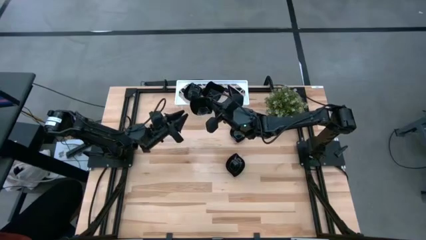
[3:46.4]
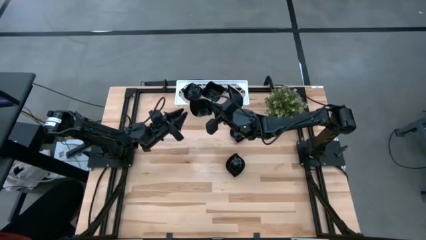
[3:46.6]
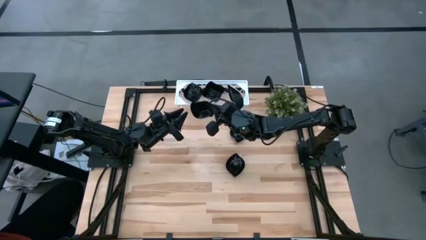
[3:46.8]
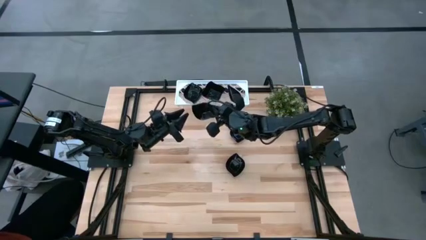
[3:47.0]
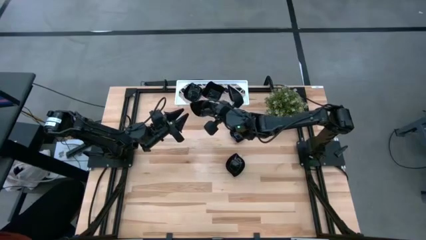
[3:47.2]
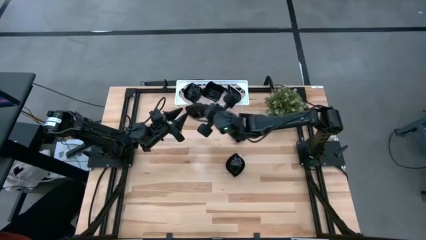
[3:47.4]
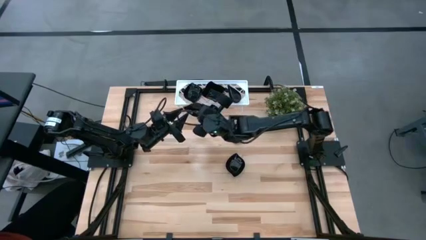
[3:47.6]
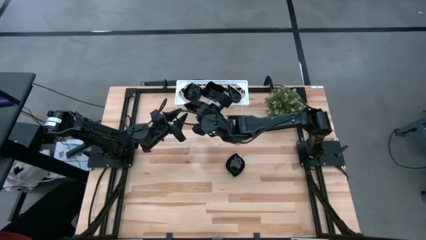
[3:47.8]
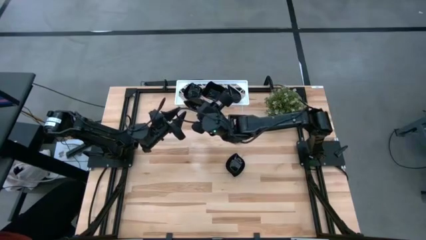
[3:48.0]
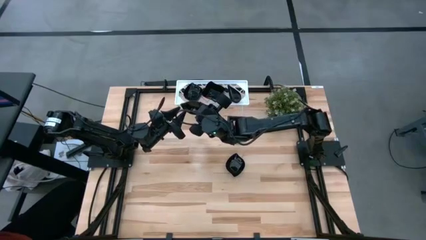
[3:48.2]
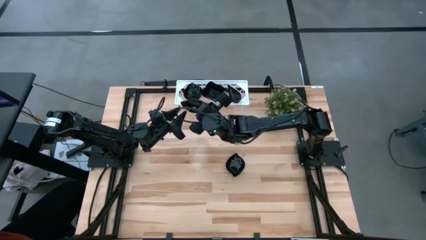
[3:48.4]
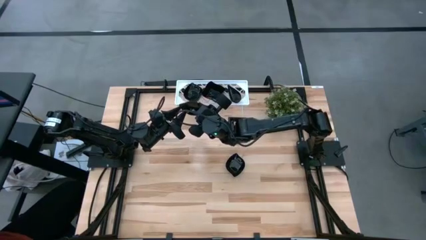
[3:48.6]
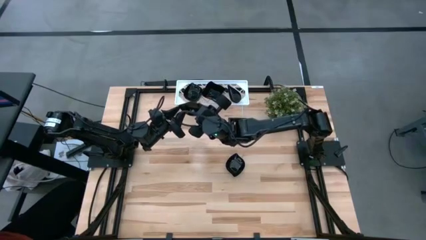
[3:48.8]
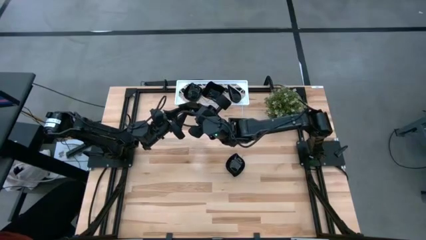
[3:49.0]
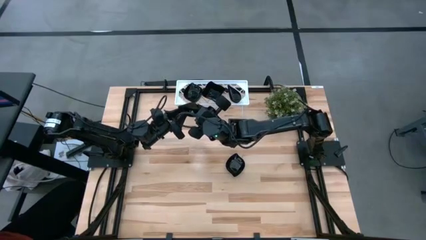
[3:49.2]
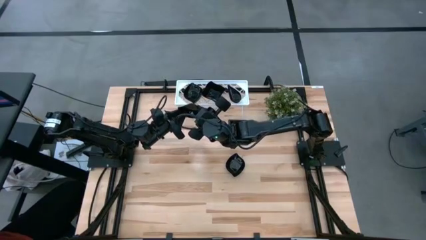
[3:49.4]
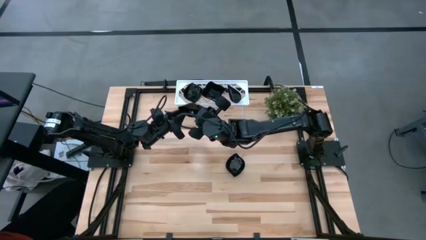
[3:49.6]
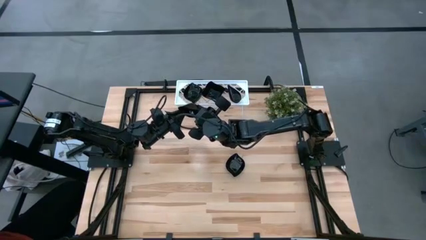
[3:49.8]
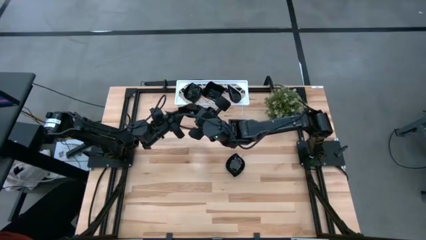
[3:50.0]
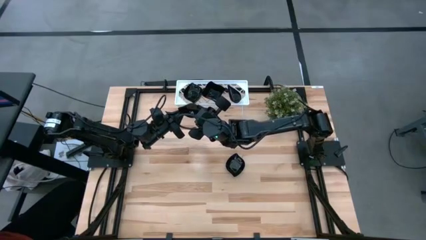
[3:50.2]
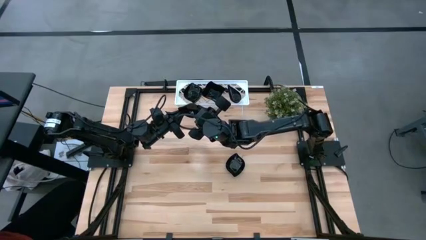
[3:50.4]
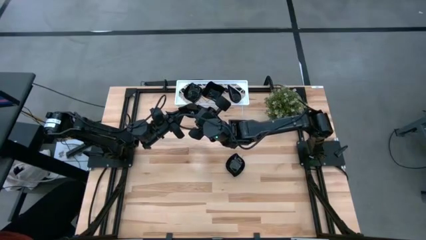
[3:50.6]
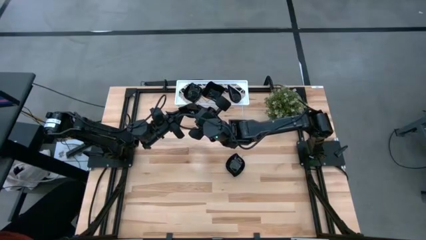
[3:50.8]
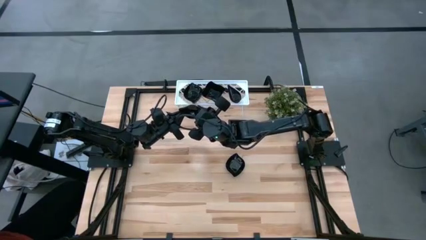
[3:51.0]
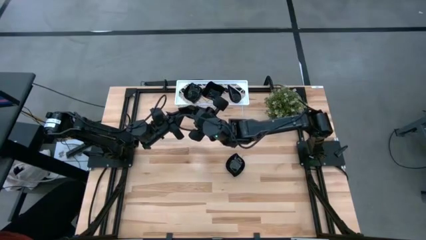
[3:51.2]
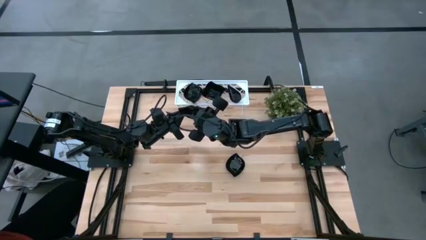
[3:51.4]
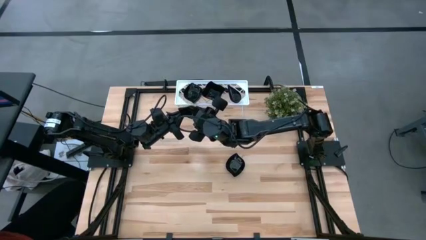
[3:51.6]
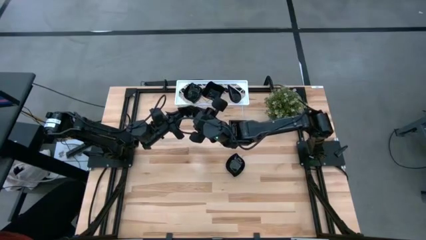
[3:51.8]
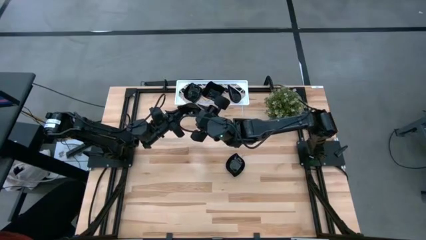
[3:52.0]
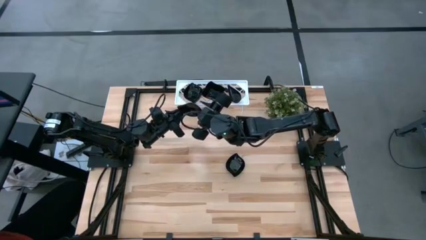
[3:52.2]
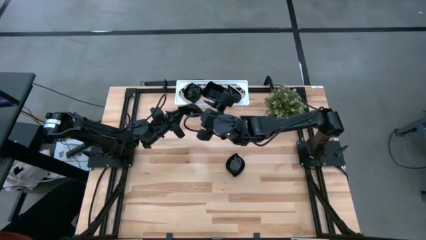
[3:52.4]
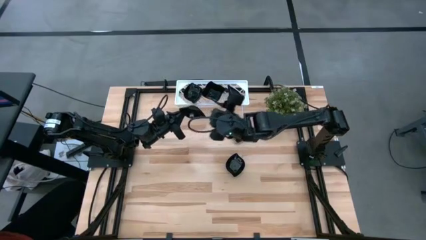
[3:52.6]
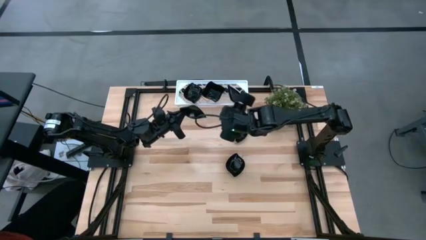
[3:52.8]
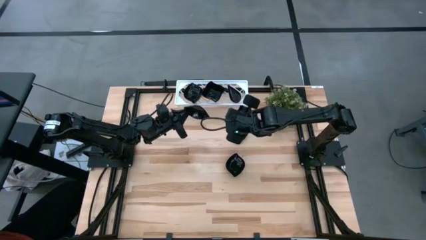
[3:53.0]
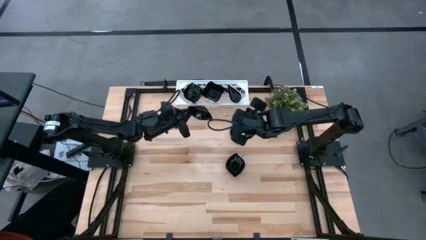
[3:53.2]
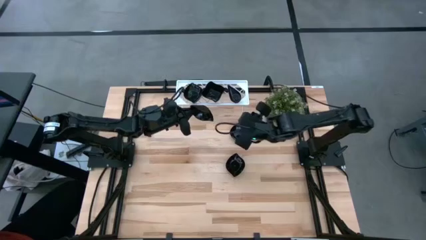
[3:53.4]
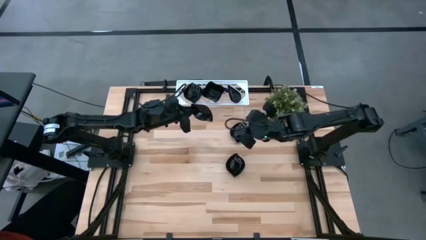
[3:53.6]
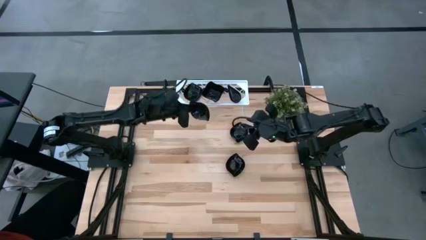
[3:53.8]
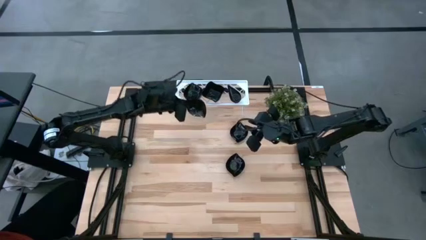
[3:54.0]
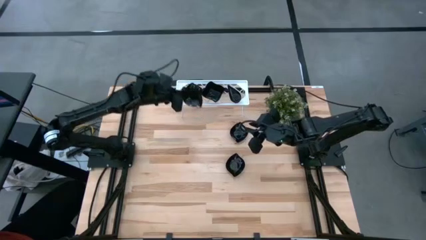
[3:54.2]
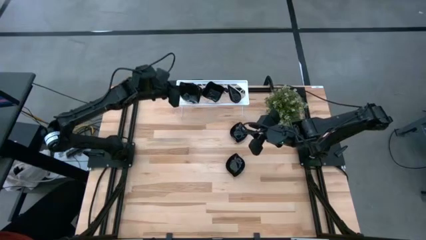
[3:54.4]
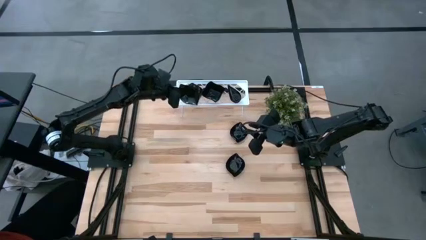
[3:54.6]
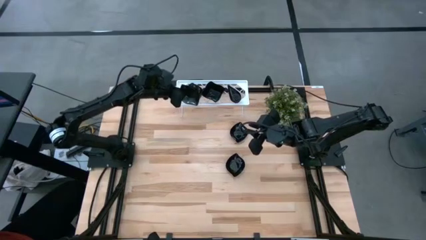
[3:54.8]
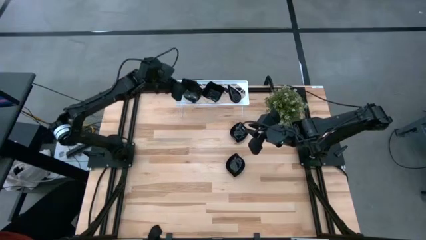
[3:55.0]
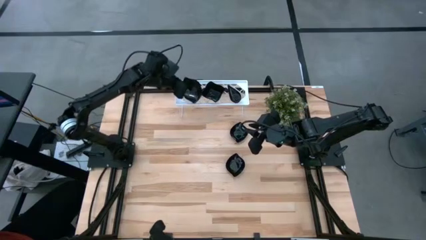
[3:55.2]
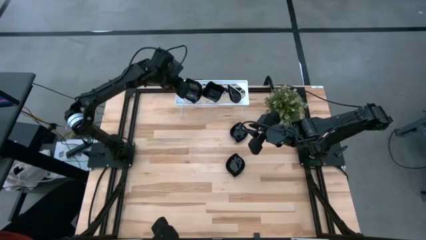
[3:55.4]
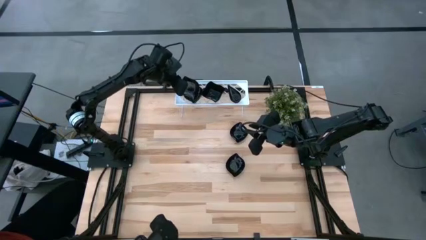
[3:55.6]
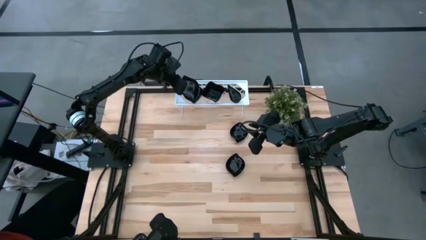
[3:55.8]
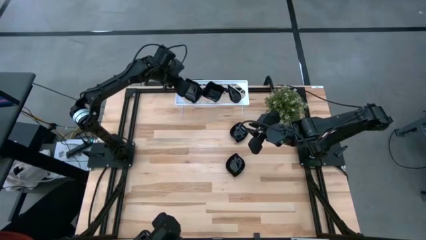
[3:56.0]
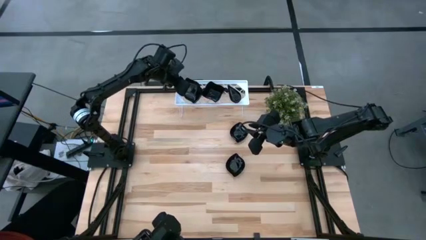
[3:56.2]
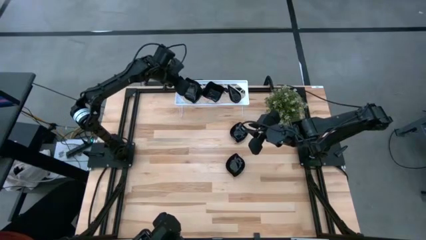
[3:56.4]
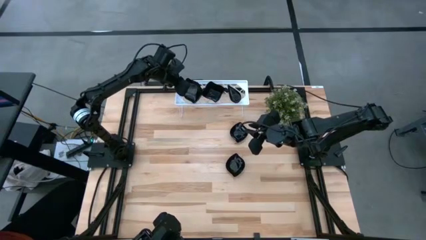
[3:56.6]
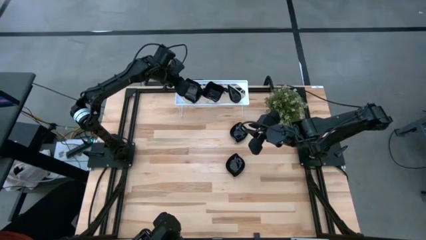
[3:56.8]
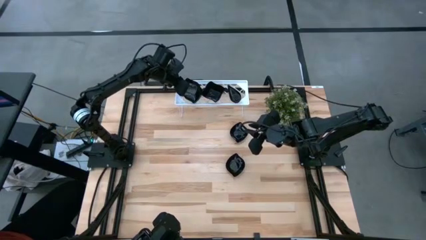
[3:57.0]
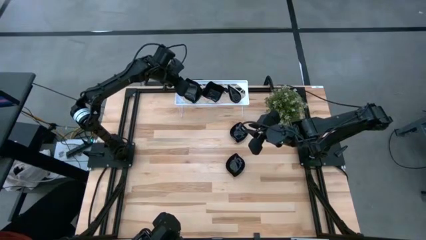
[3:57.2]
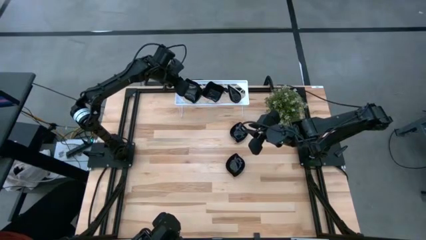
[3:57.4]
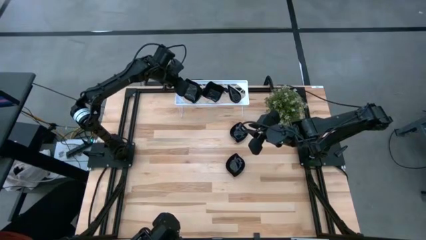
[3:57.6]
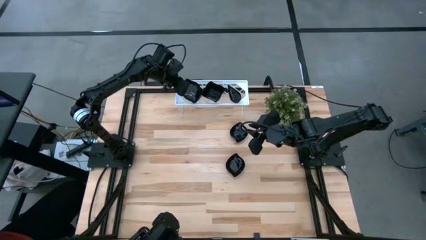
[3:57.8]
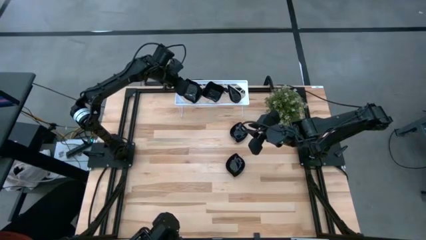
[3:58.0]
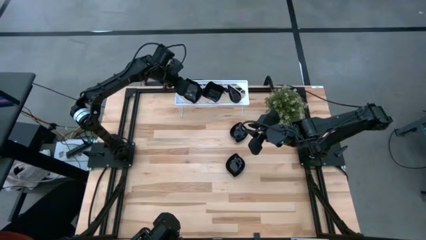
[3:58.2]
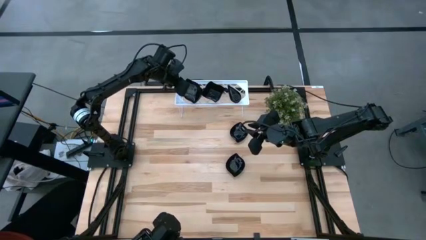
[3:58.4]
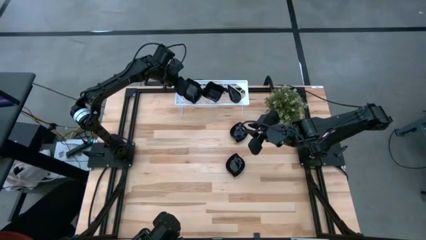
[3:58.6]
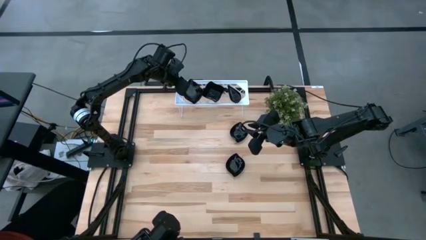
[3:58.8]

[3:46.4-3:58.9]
Task: Pick & Place Mini shaped plates
Stack the leaf-shaped plate on top of the other leaf-shaped plates on the shelf

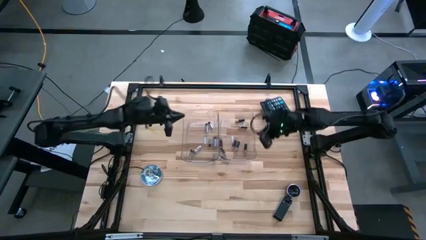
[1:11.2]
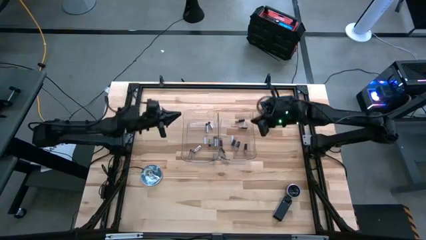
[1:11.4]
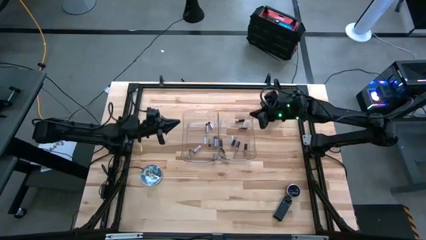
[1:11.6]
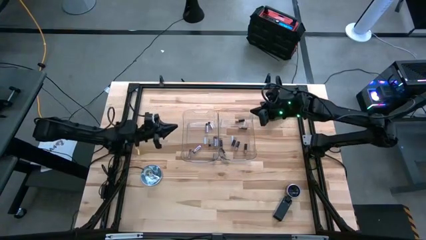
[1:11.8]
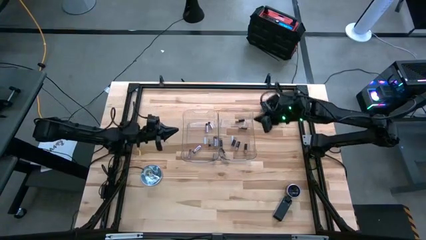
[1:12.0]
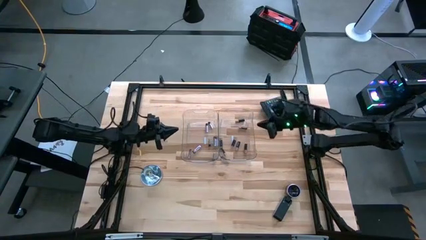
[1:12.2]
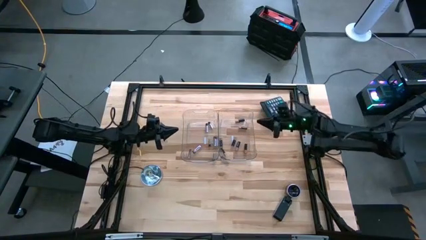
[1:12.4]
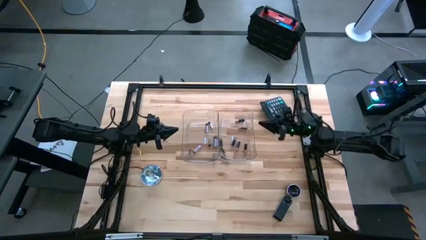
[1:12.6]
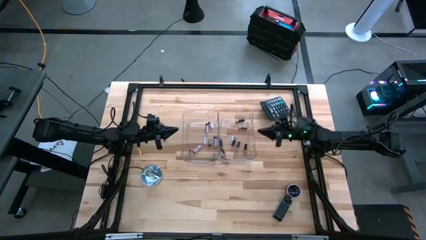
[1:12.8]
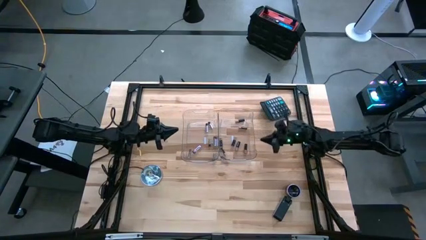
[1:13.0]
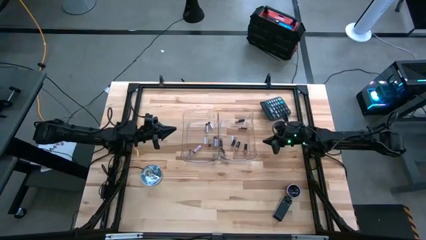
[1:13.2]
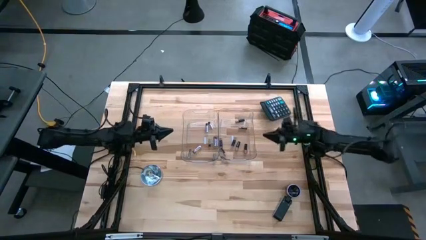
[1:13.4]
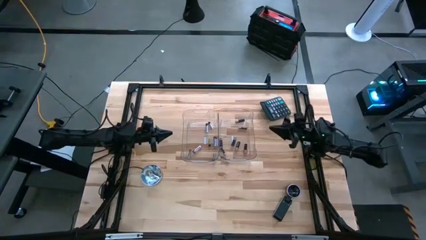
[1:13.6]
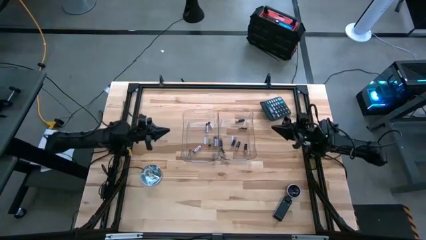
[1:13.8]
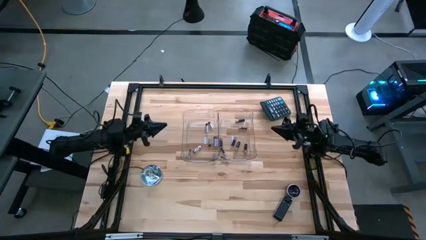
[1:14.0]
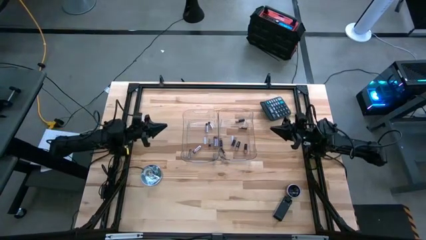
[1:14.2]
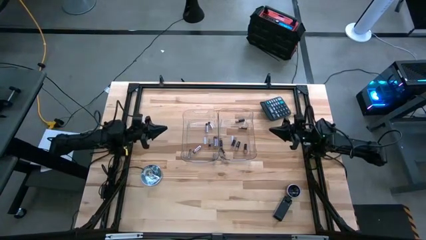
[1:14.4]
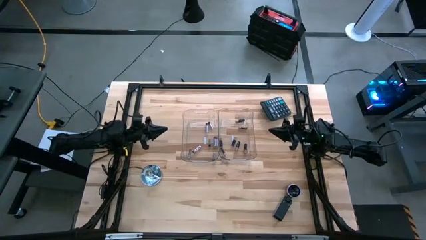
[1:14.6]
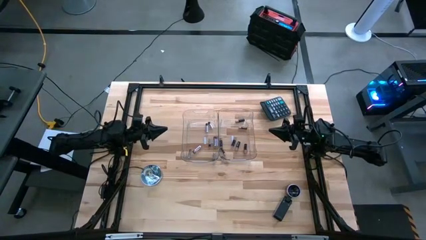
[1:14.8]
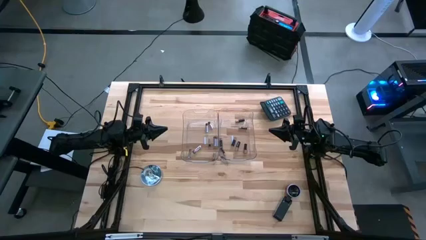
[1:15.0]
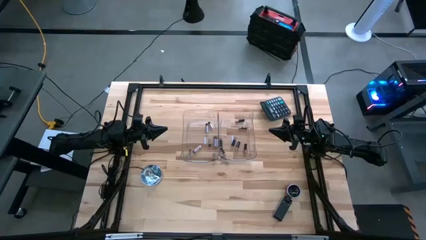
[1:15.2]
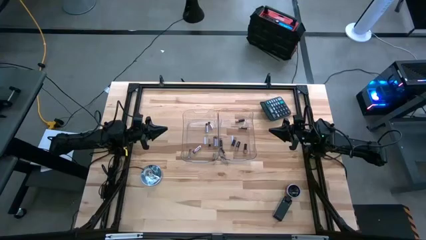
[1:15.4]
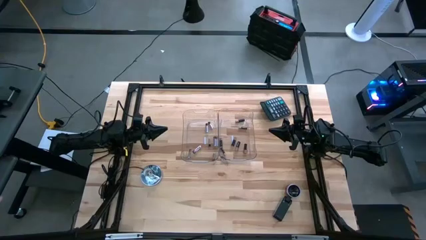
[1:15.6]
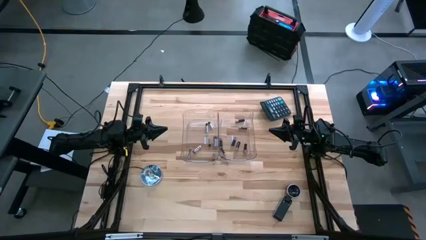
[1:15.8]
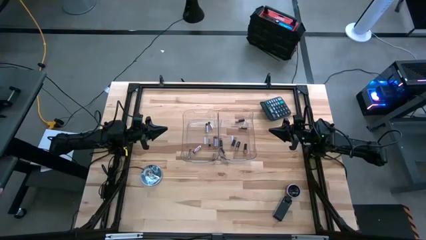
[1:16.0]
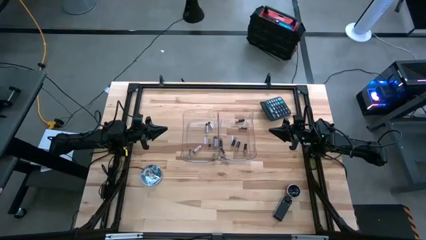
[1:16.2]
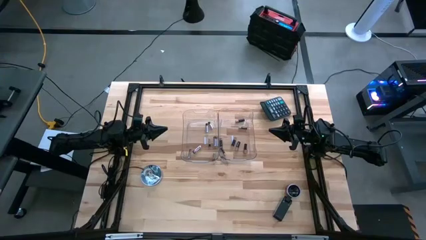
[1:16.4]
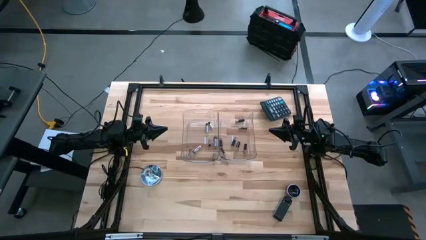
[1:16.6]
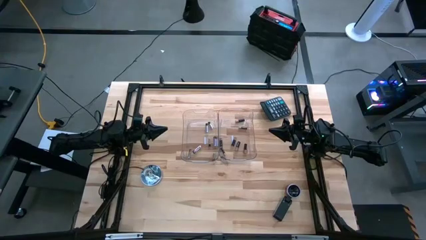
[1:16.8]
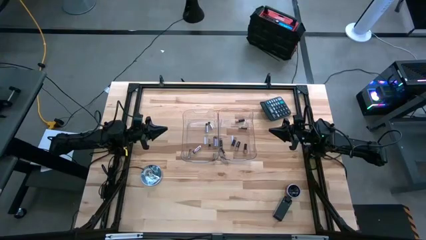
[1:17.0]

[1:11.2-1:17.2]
Task: Sort batteries
Return to Home Position
